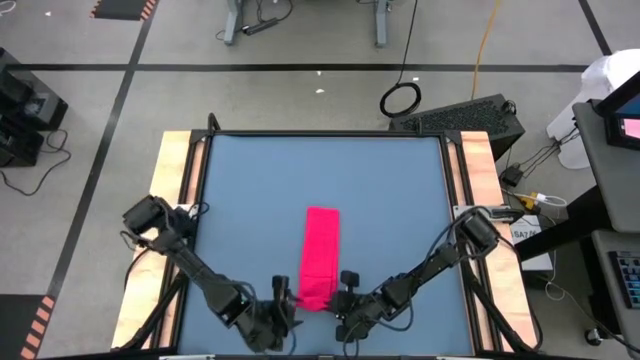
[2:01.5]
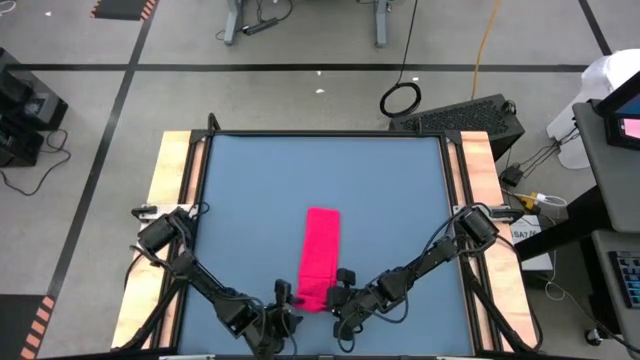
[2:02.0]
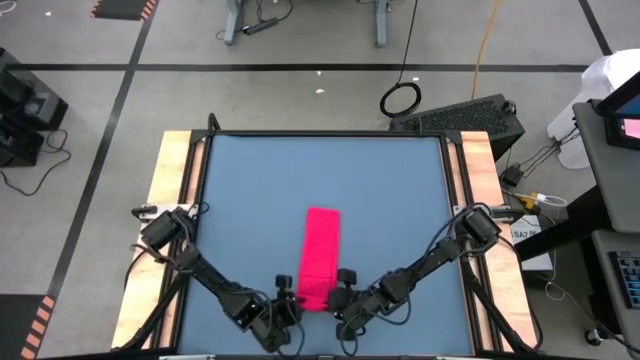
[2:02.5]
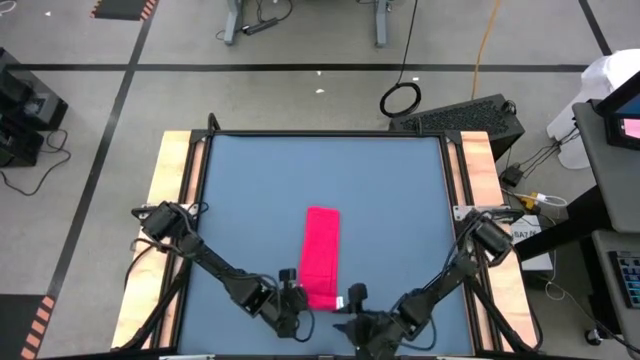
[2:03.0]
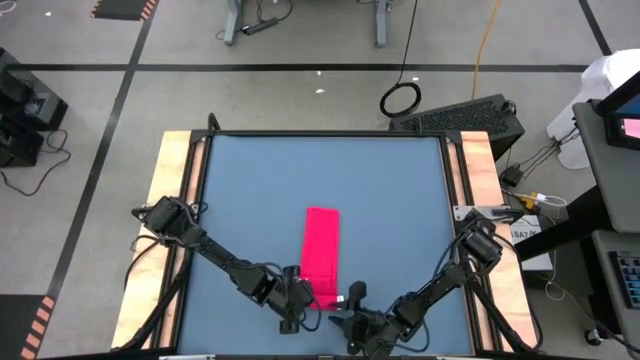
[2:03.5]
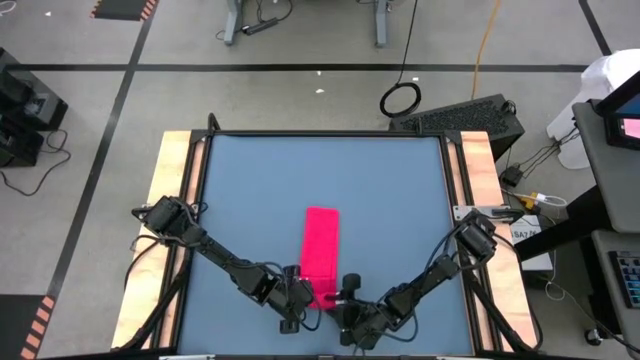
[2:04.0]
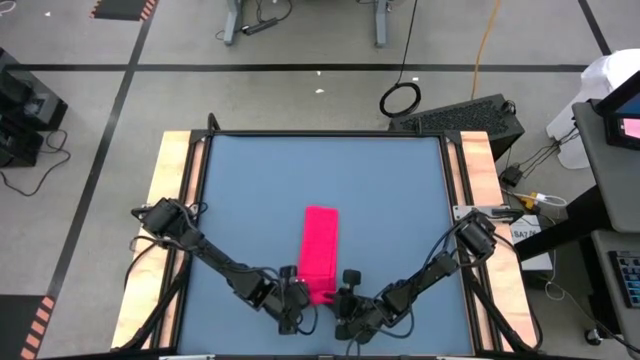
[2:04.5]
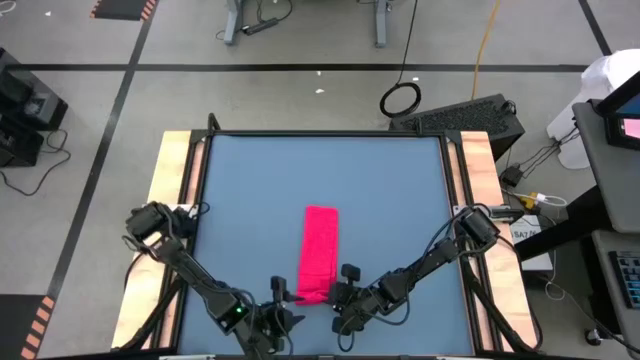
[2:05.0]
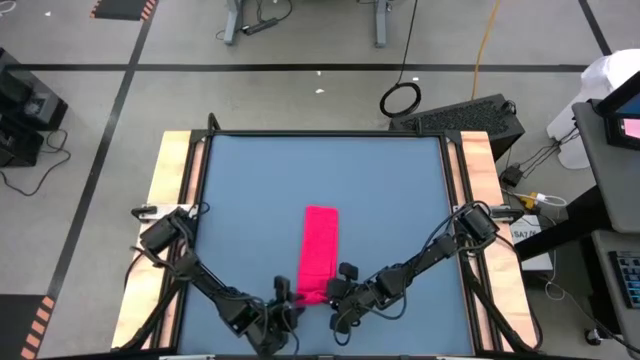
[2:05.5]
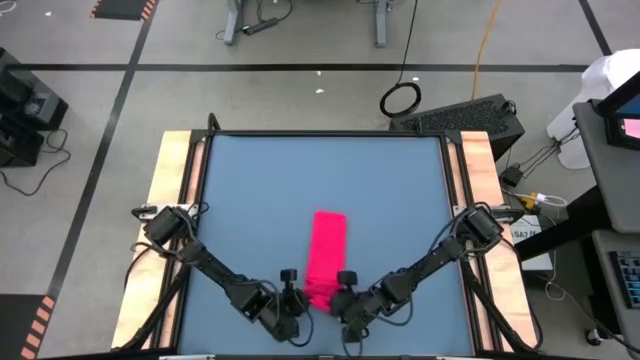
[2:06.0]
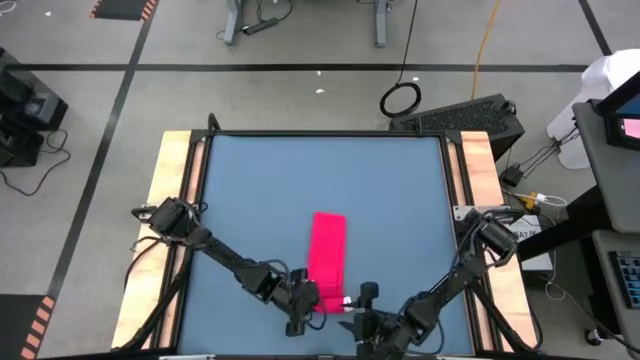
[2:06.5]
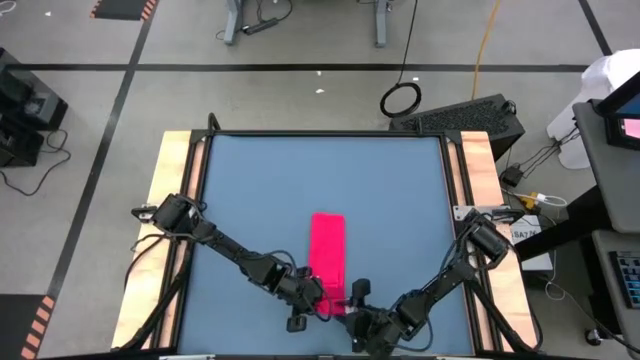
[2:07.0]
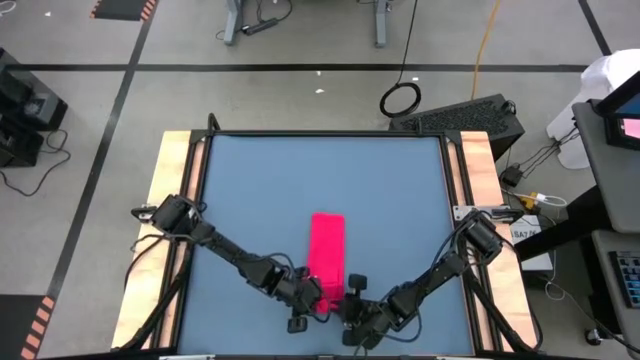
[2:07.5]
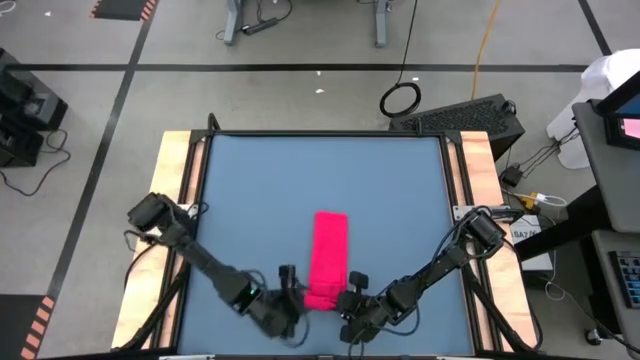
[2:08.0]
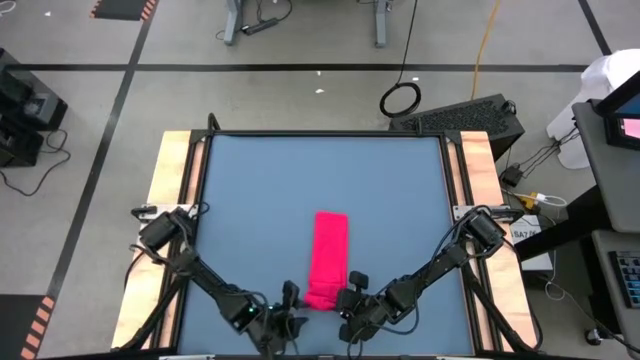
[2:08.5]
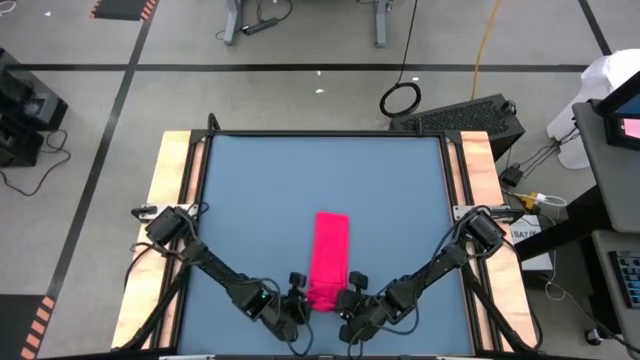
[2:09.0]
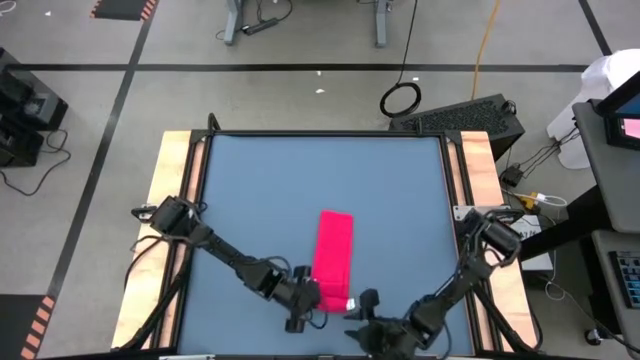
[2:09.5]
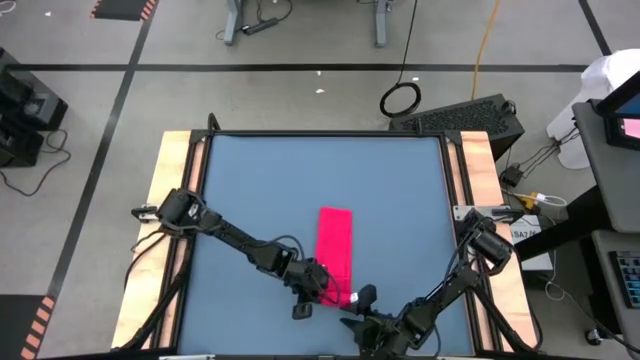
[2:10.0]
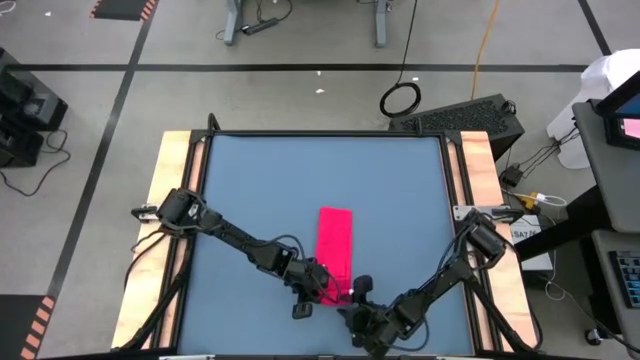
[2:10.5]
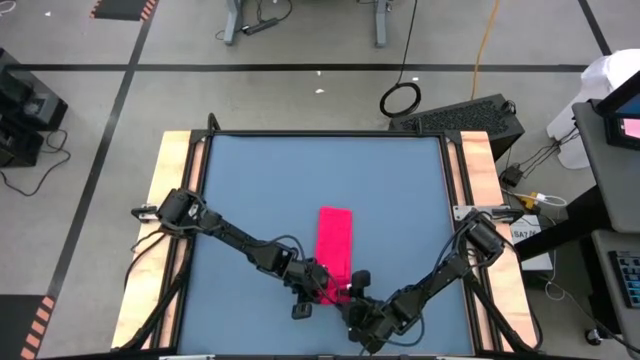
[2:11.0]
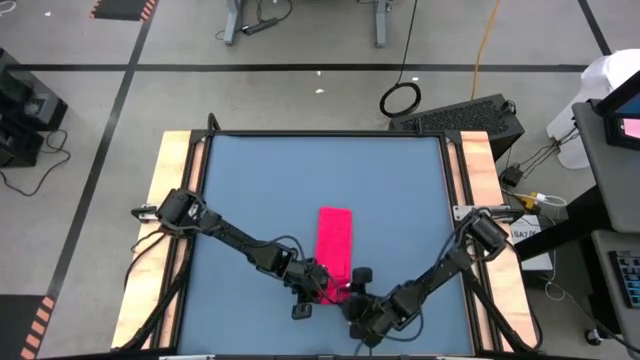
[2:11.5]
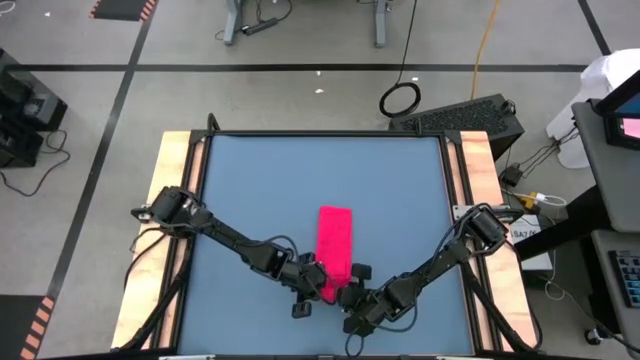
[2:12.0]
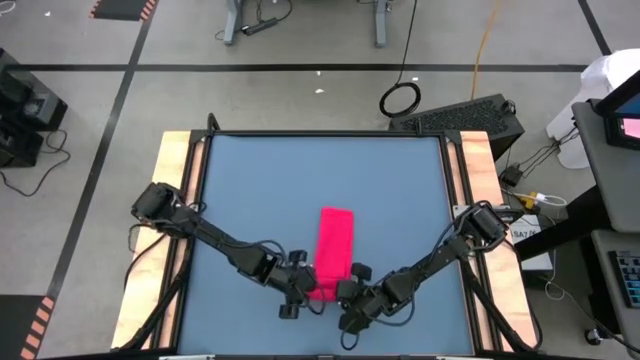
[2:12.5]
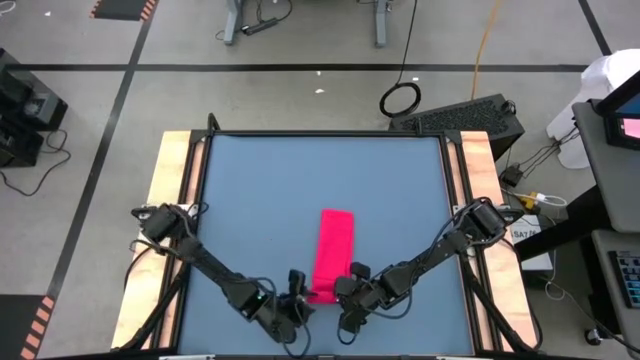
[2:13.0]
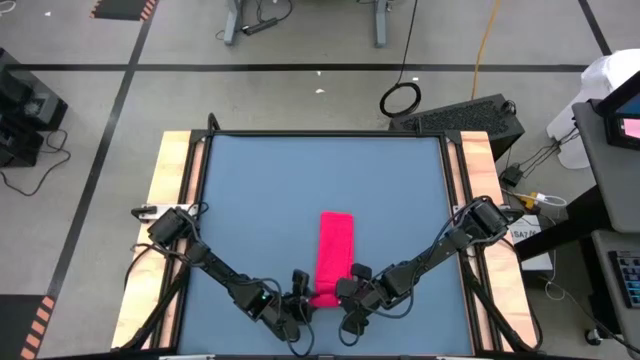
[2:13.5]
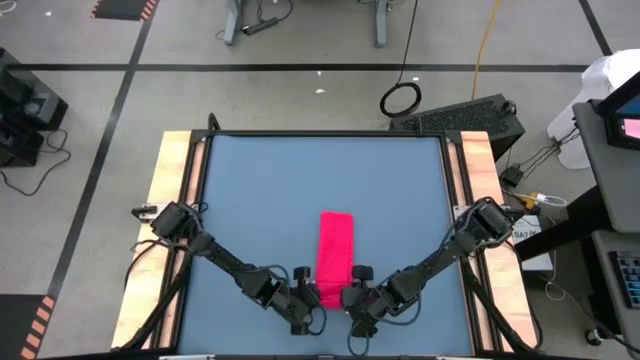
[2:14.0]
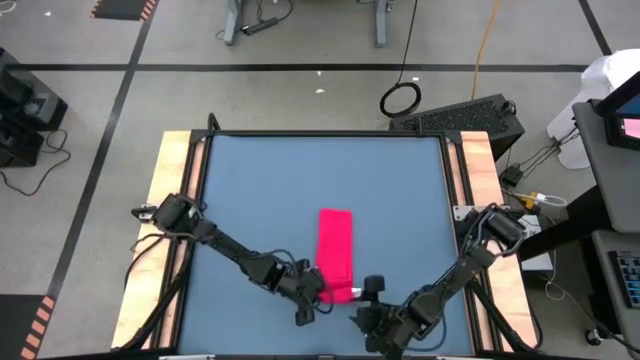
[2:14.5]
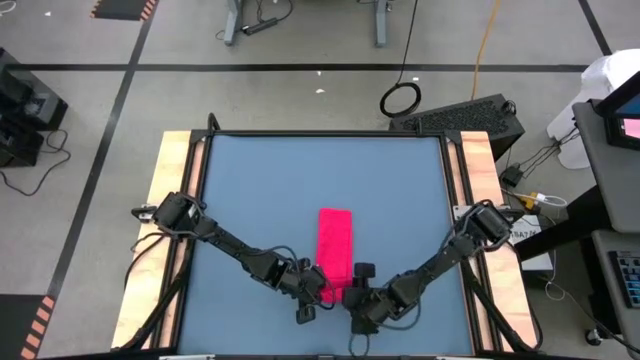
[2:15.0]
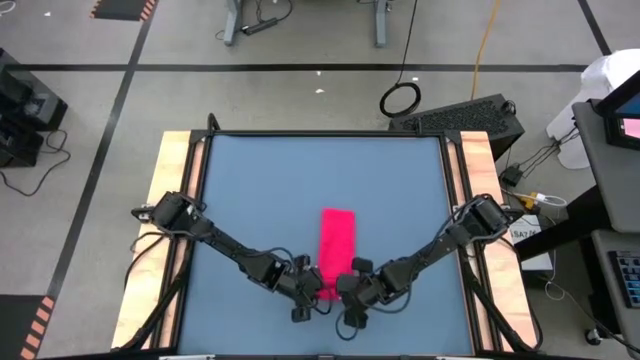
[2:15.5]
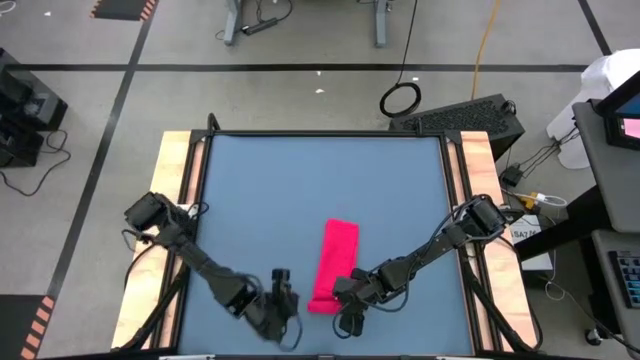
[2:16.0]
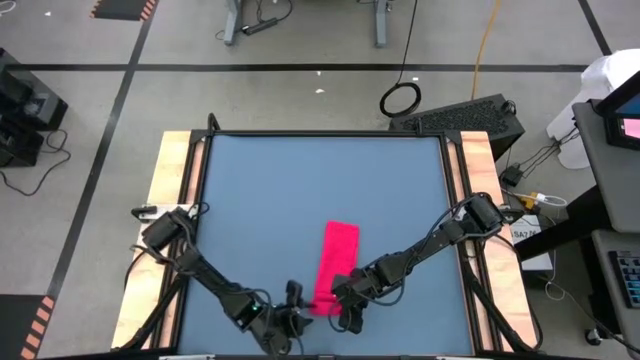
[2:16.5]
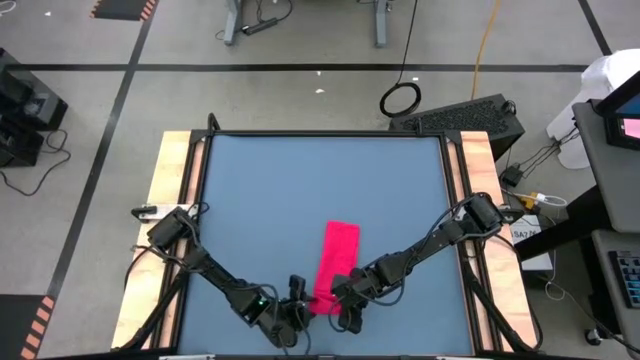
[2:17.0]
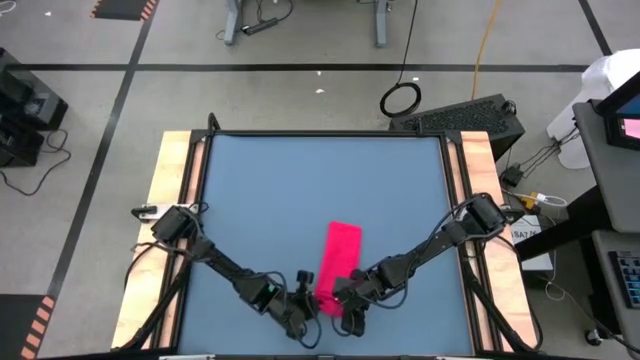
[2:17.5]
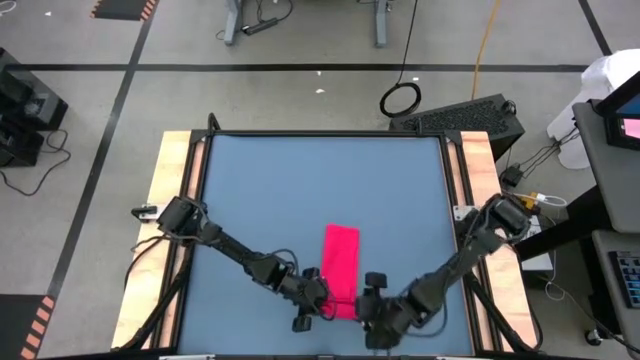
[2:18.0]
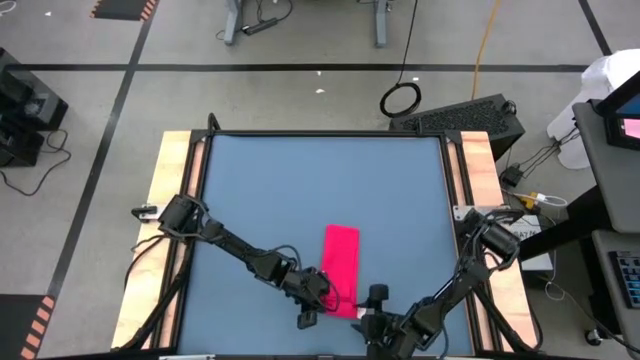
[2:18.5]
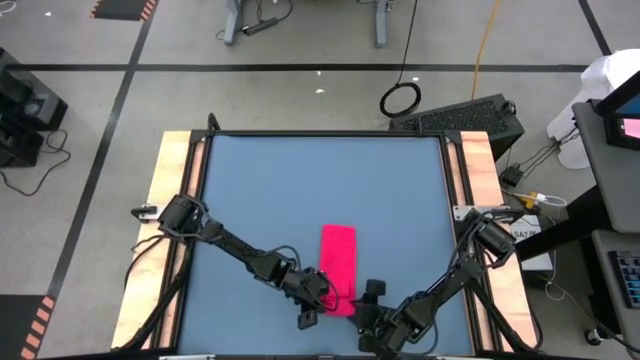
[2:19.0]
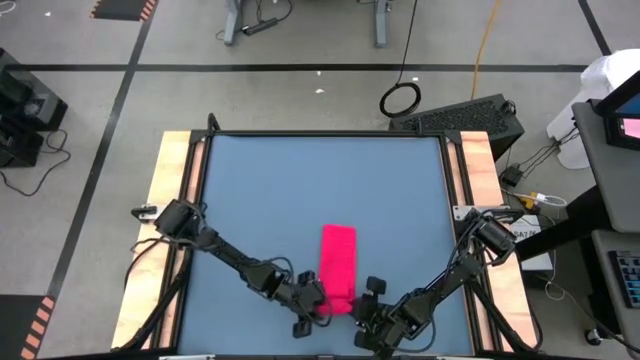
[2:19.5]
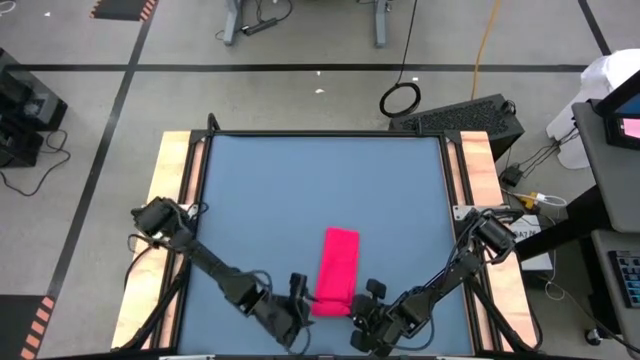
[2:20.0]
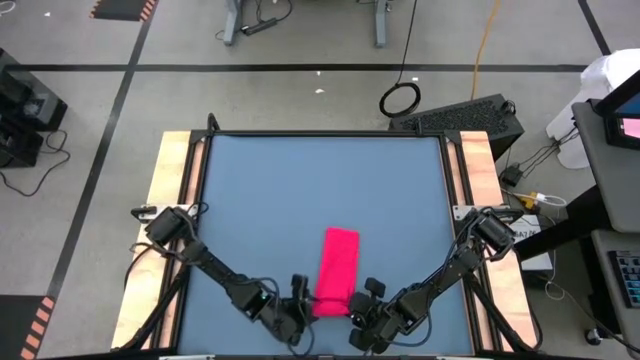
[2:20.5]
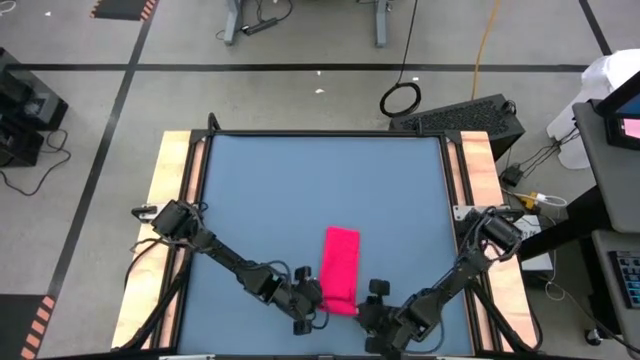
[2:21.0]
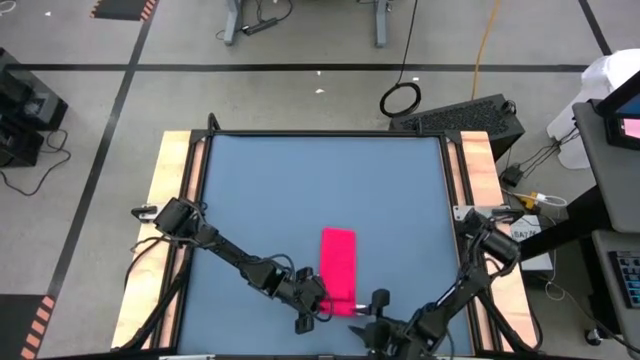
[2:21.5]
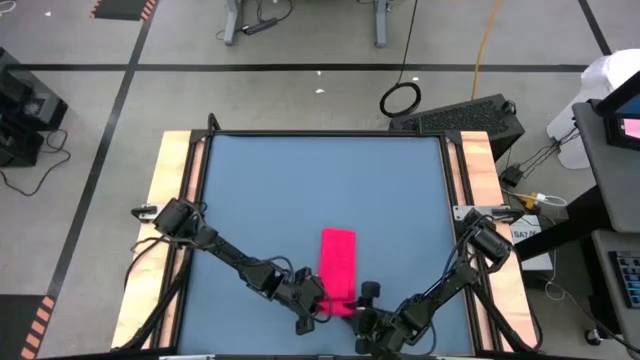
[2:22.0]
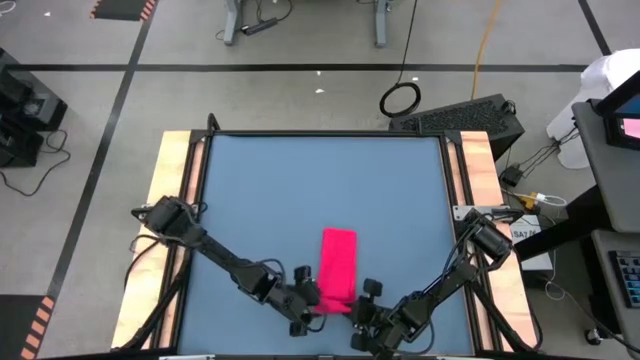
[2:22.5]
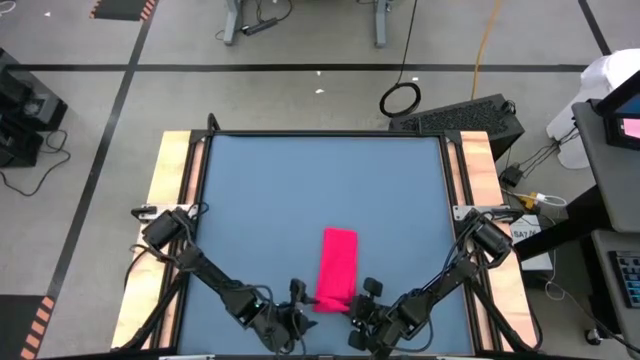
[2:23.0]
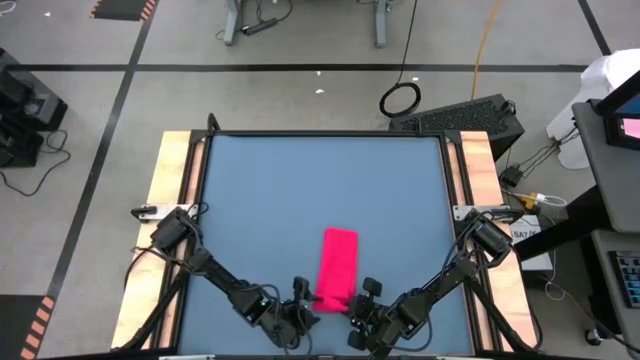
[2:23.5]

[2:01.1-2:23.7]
Task: Roll towel
Roll the red towel
